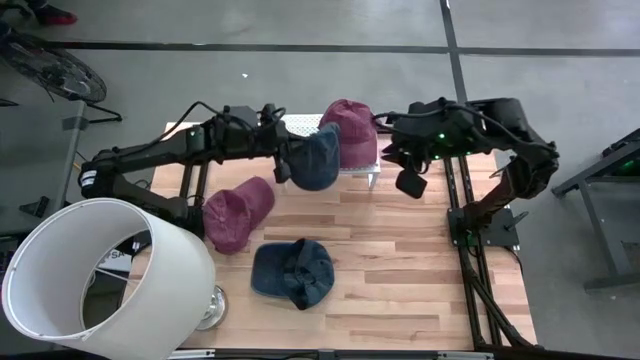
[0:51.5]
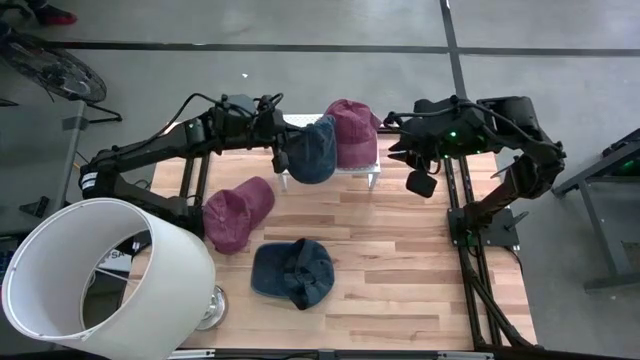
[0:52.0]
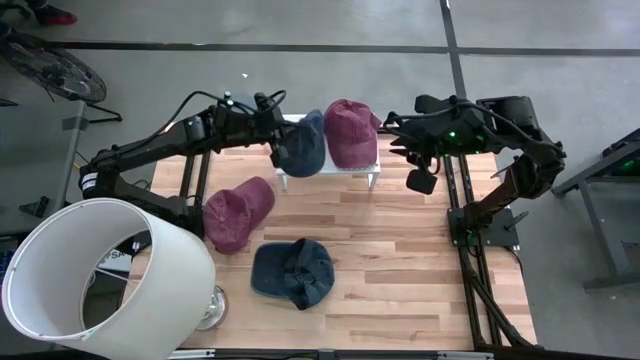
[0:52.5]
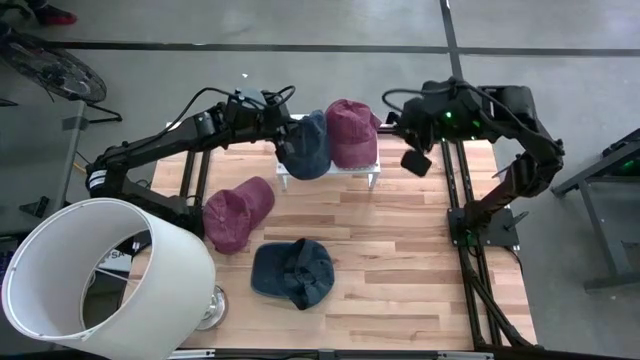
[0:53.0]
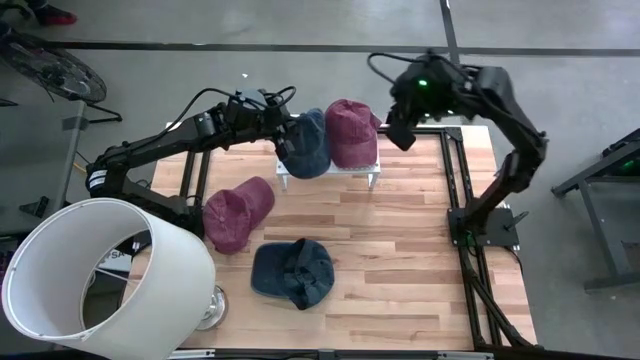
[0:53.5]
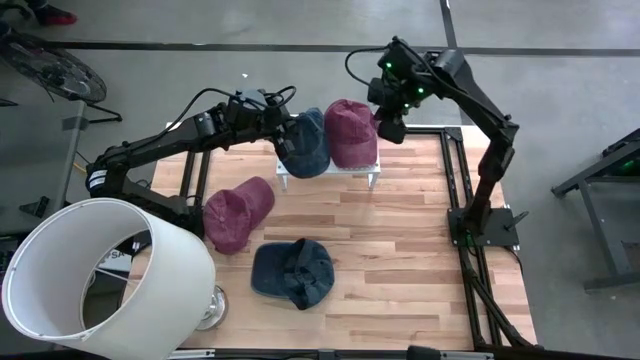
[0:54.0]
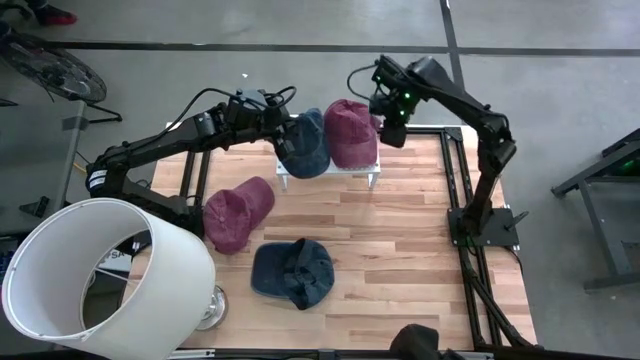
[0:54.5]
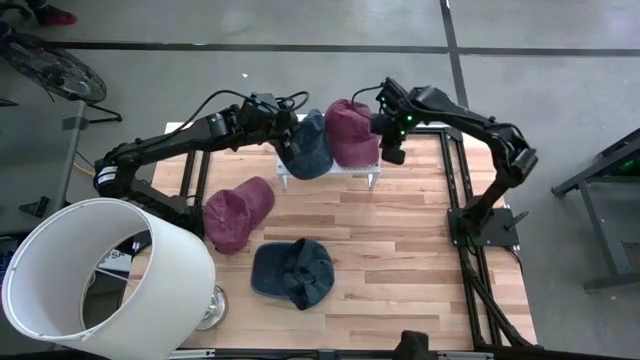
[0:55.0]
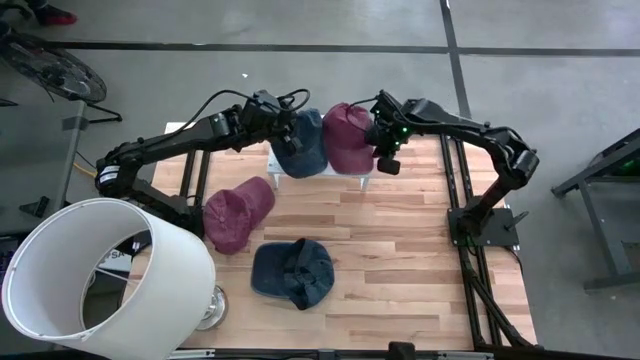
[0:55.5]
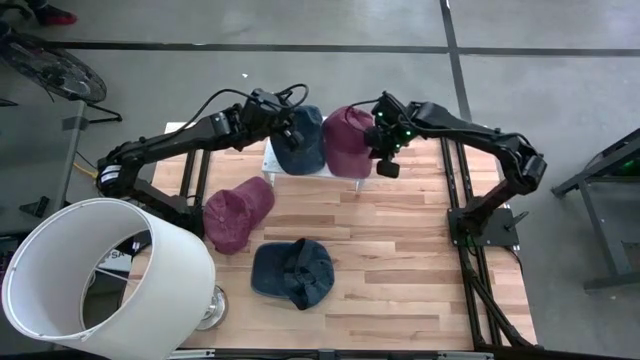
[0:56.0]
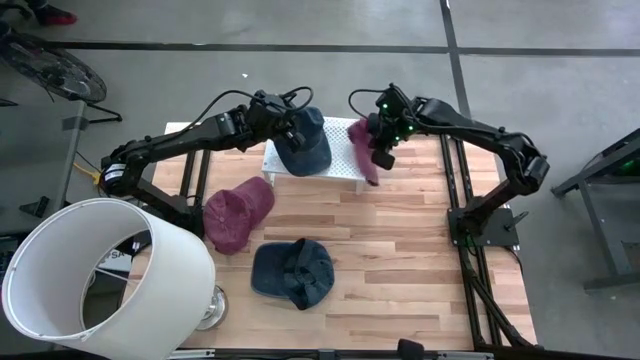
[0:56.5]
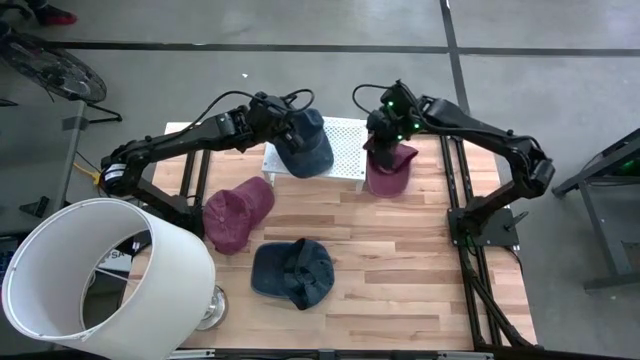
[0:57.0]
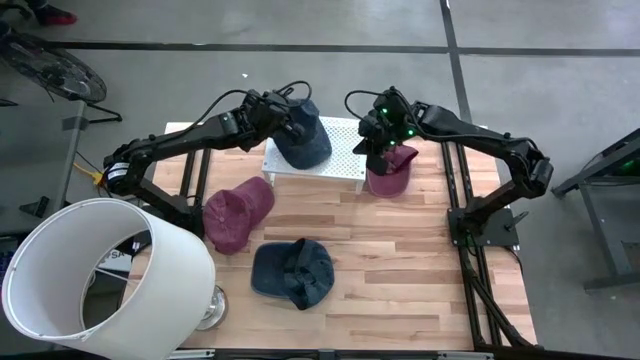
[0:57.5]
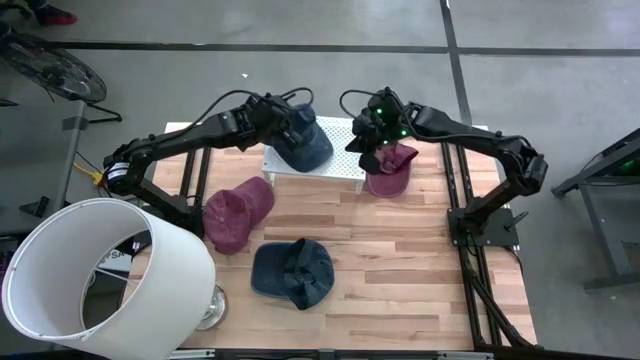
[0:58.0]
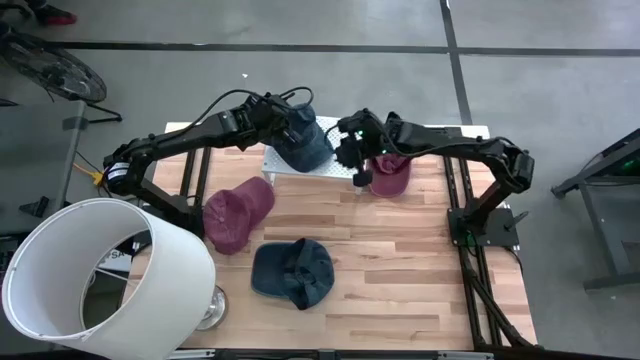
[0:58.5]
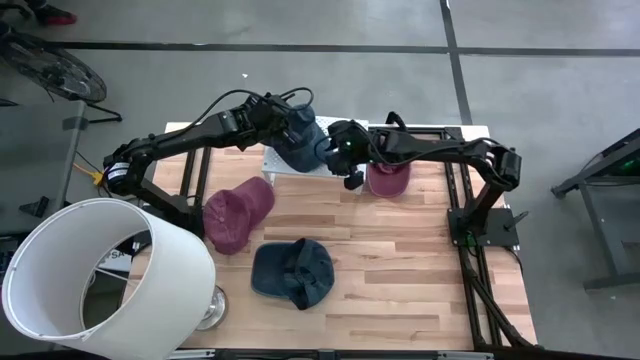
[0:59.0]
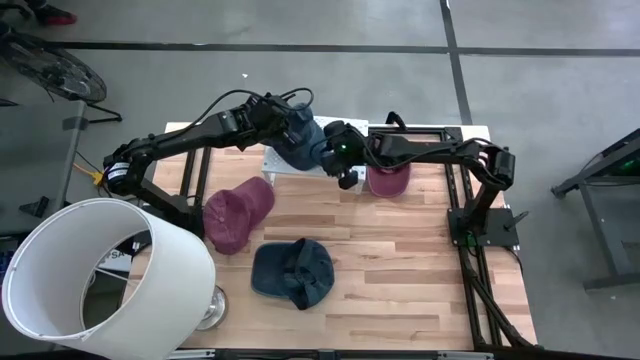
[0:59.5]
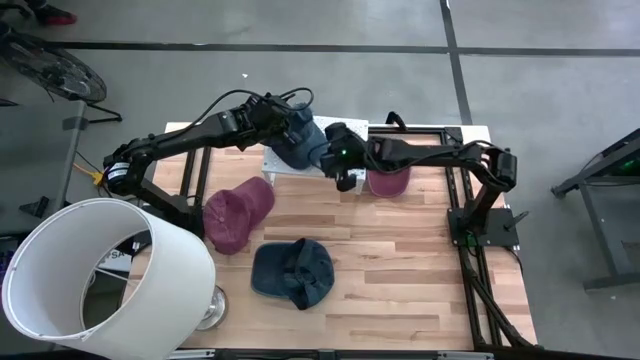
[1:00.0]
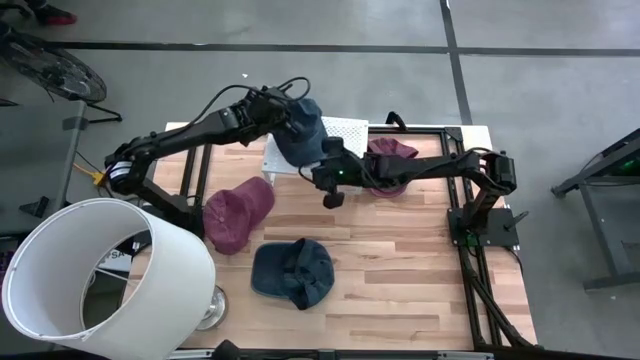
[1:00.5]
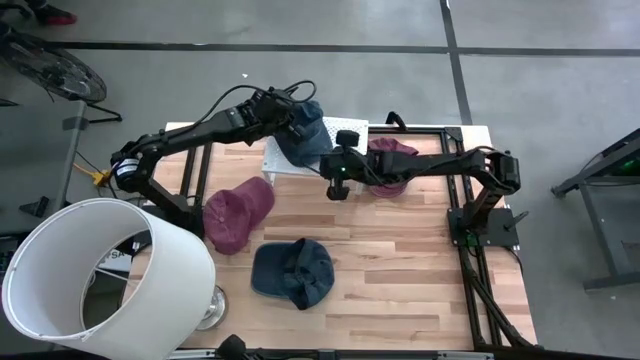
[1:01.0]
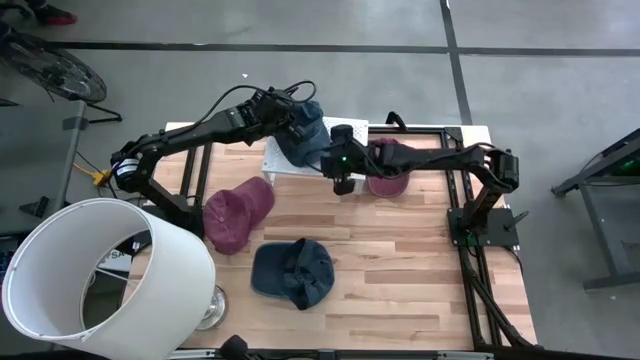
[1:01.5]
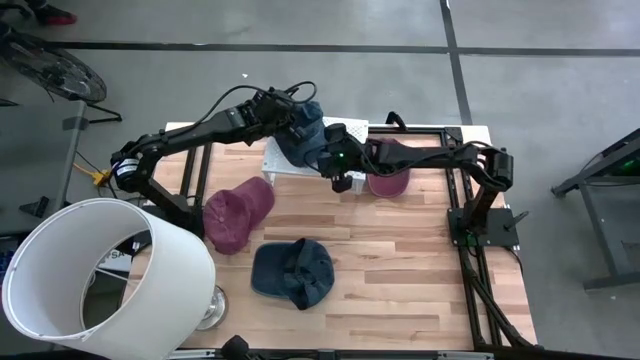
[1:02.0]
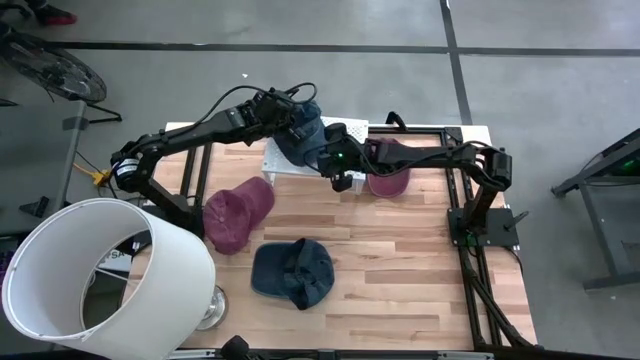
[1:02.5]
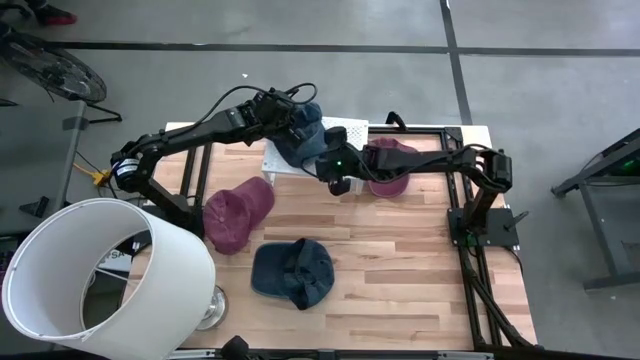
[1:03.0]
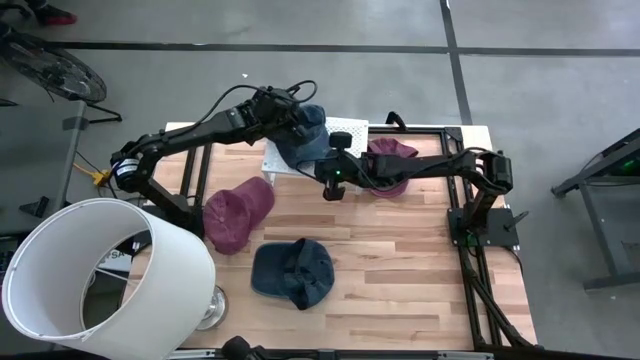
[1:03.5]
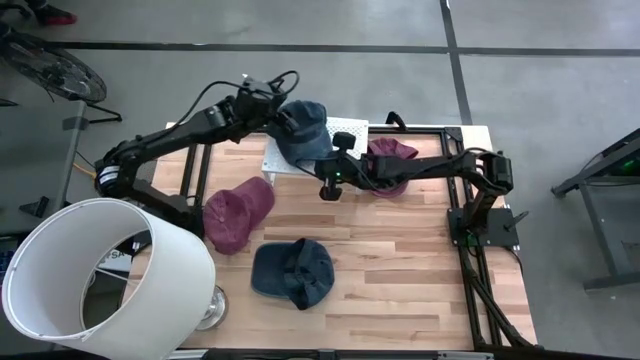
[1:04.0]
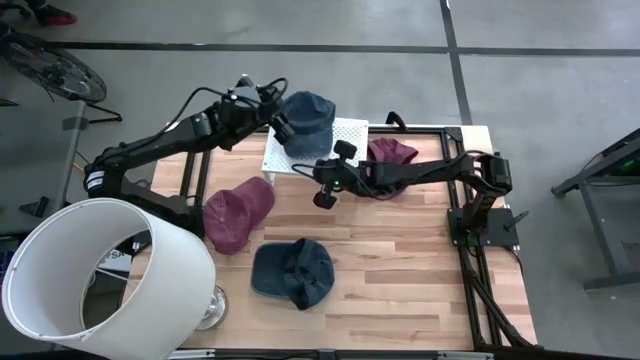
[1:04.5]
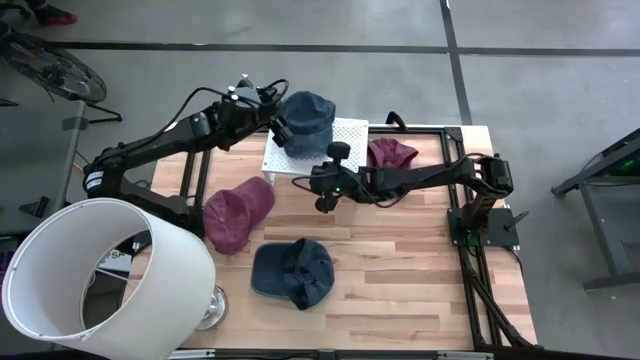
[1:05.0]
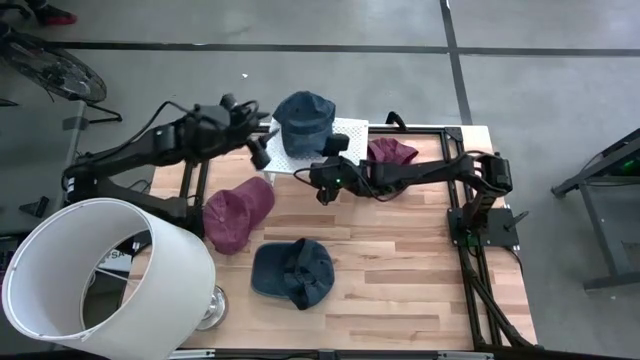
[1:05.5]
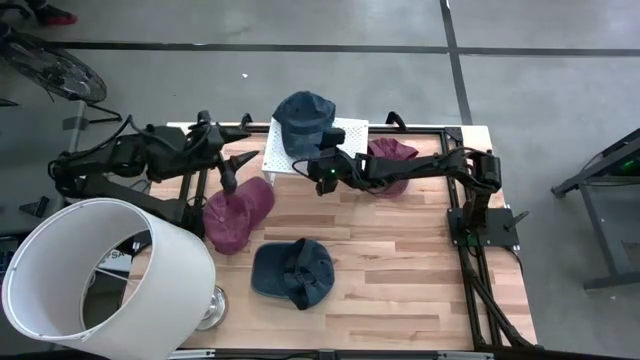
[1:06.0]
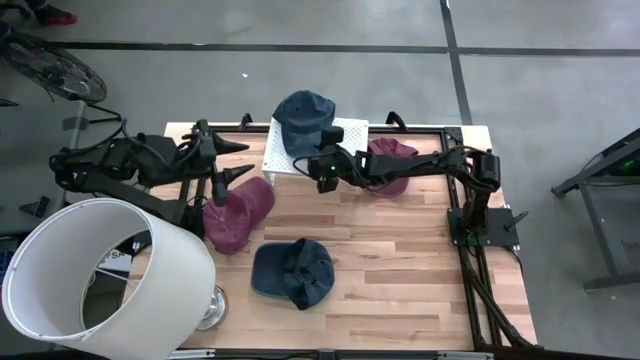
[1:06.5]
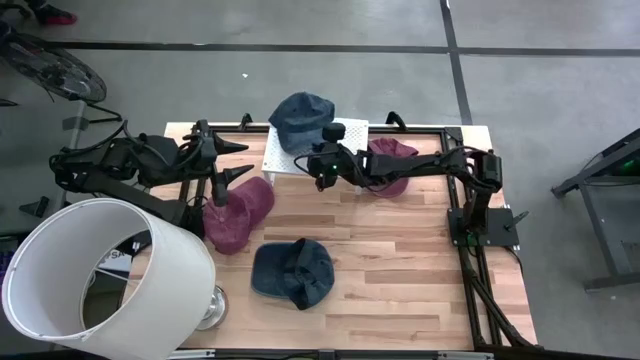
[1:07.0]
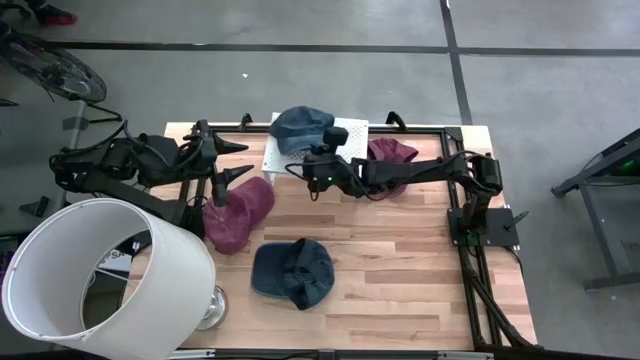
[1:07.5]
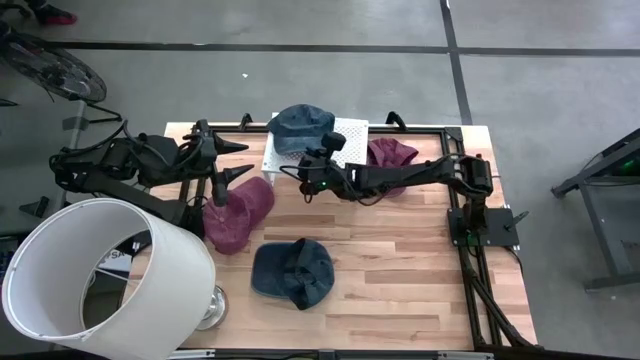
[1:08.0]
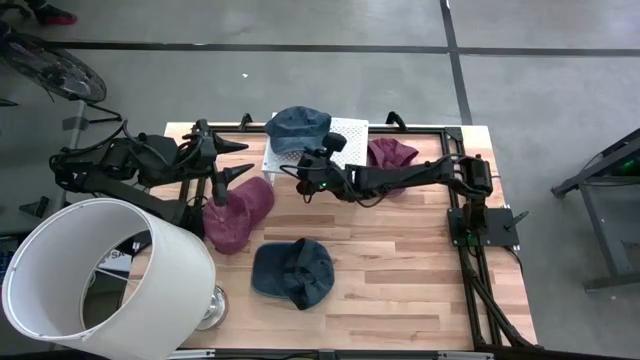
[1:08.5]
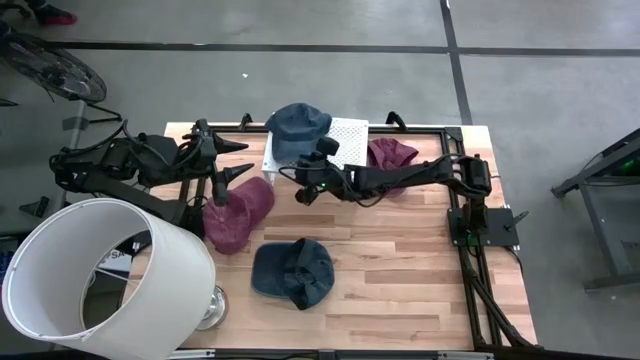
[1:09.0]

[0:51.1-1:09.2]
Task: Pick & Place hat
Put the top black cap on the shelf
